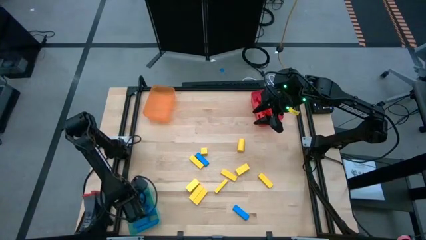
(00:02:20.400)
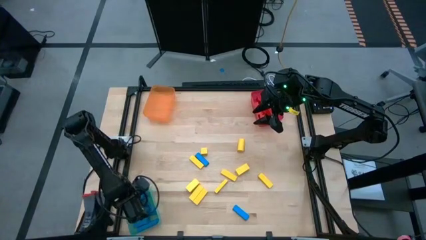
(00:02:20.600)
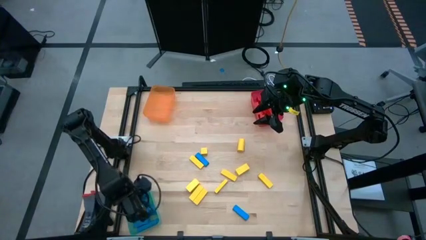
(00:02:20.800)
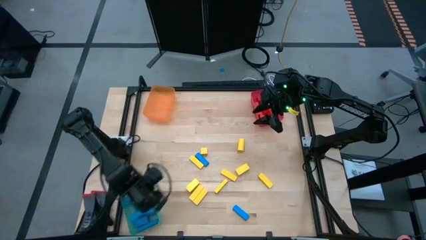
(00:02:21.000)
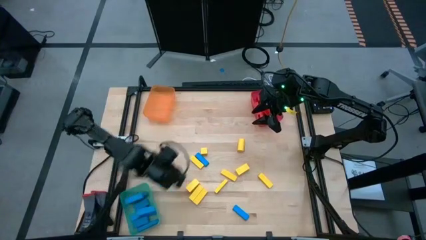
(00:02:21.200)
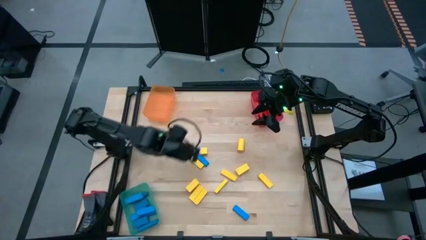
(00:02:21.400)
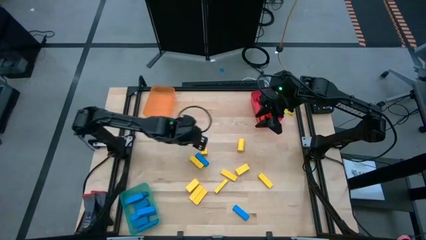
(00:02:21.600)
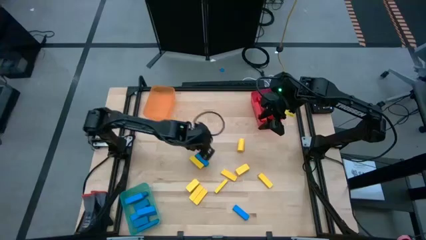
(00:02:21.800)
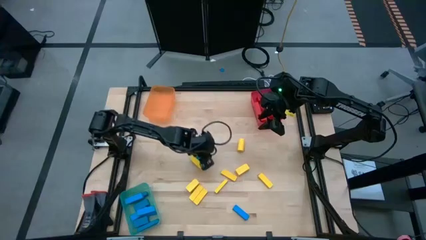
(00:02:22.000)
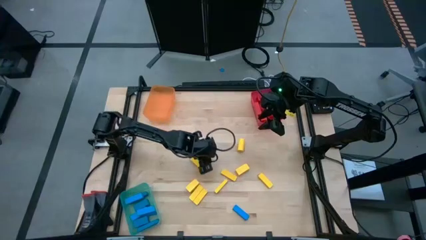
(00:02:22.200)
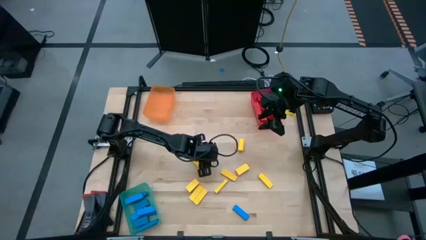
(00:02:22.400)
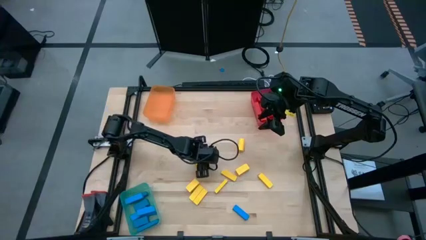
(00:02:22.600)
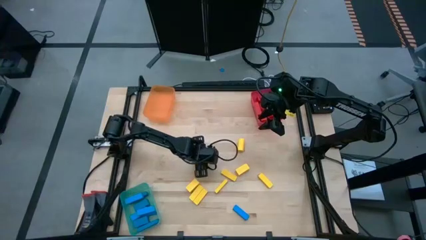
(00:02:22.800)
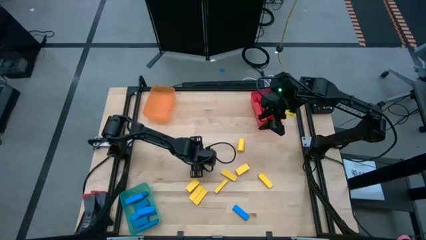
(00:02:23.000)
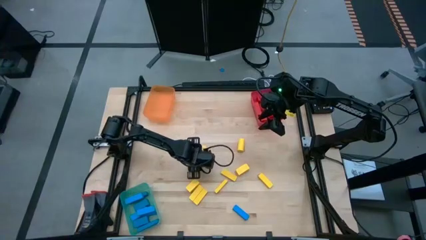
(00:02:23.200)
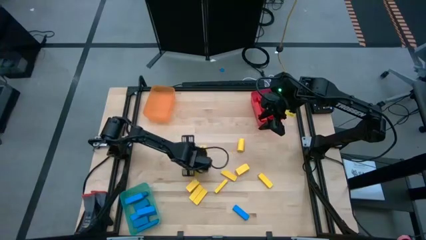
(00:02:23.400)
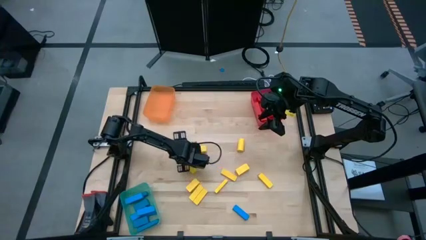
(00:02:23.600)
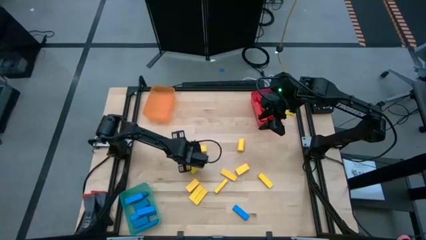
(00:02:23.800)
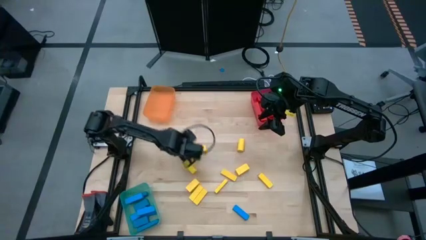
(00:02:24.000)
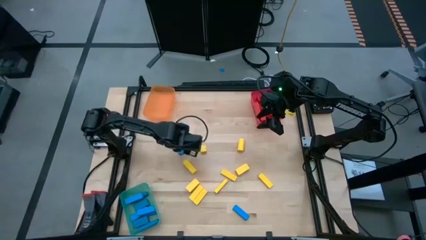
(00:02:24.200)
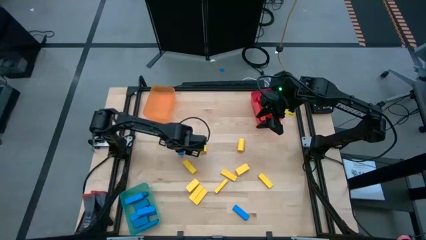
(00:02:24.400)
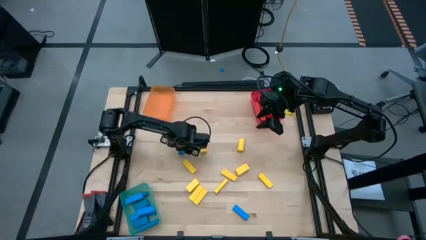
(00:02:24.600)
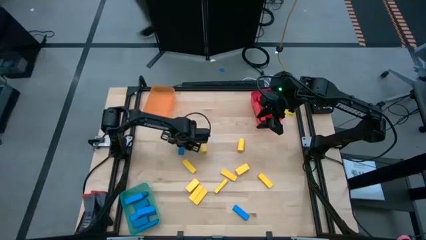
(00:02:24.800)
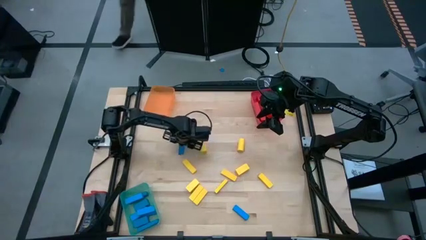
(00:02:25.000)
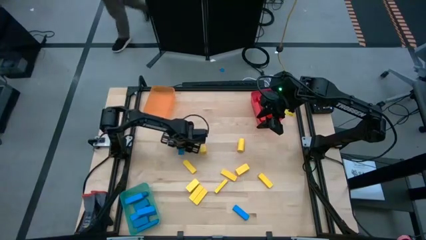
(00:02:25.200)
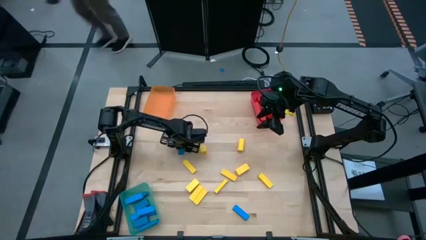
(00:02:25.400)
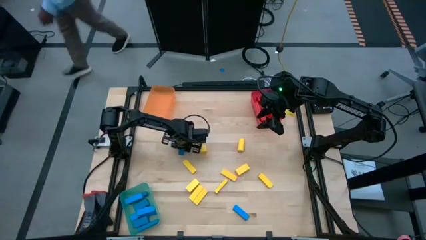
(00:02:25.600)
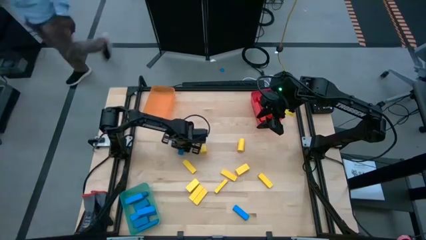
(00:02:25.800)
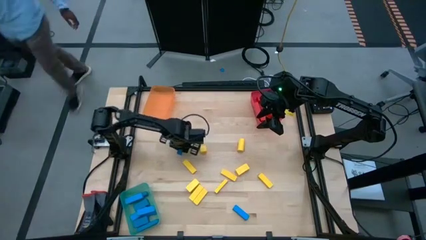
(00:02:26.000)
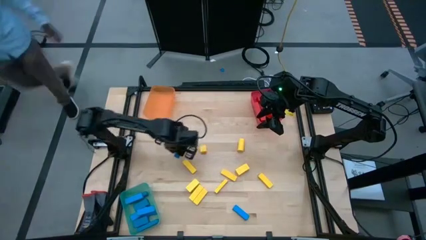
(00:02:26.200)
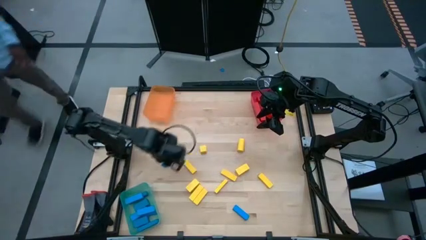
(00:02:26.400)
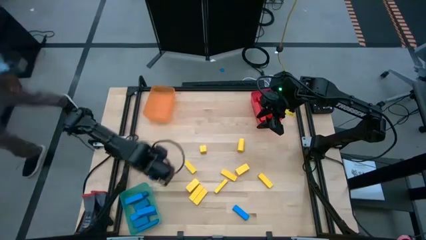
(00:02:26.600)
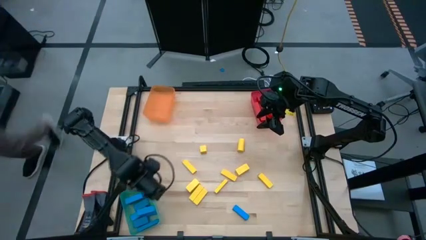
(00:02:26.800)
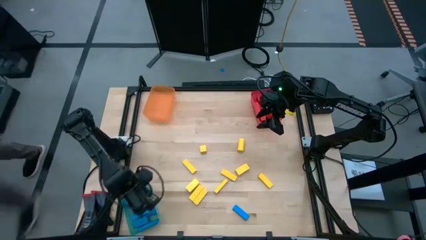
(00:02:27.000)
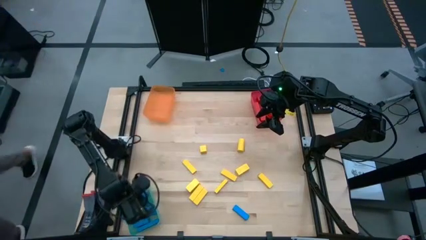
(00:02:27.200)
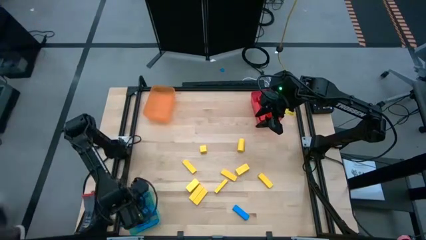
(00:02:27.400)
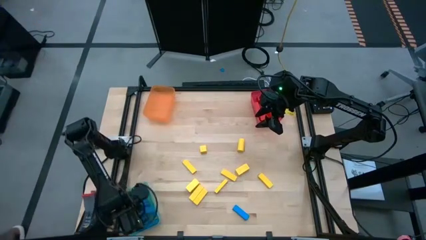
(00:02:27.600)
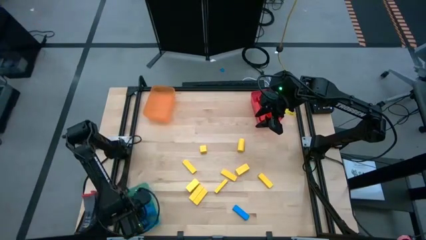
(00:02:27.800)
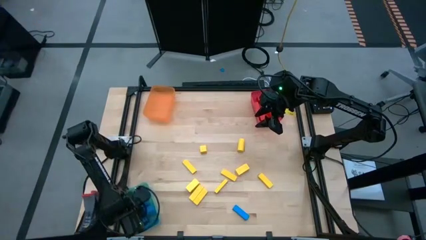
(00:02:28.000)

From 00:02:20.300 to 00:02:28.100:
Task: Sort blocks
Put the blue block into the green transparent bin

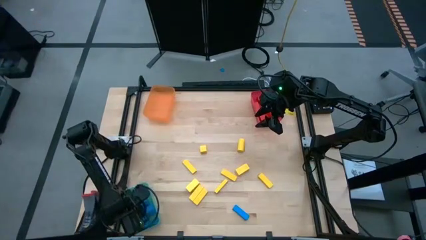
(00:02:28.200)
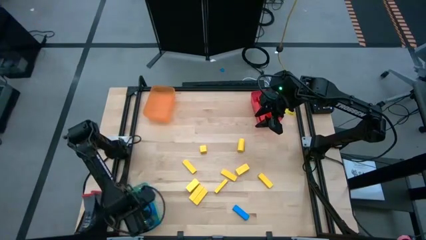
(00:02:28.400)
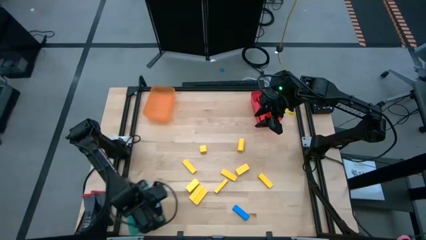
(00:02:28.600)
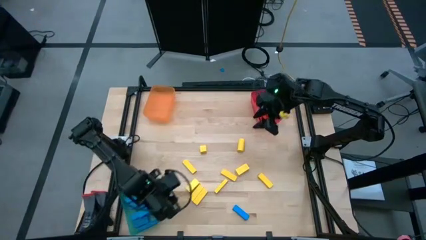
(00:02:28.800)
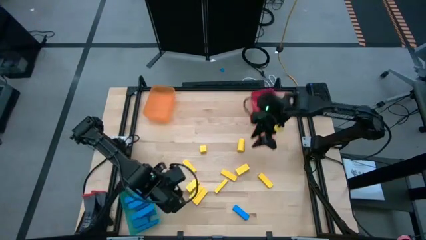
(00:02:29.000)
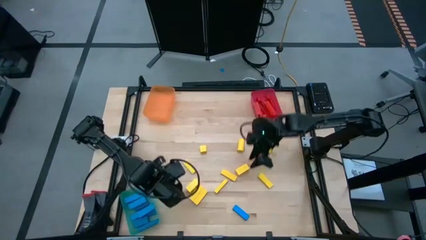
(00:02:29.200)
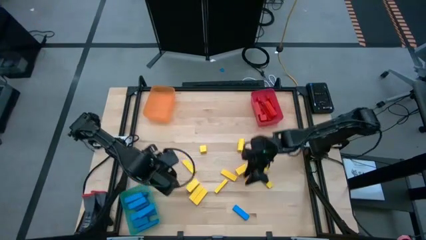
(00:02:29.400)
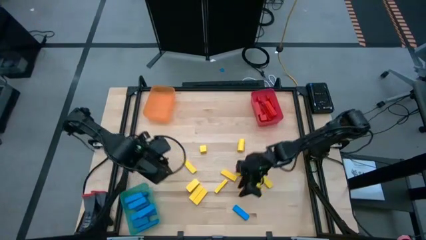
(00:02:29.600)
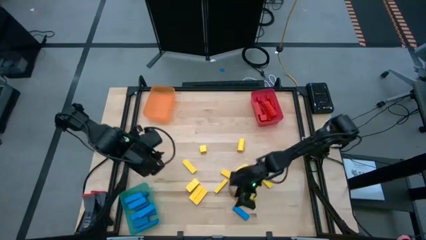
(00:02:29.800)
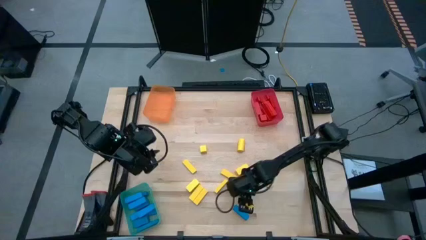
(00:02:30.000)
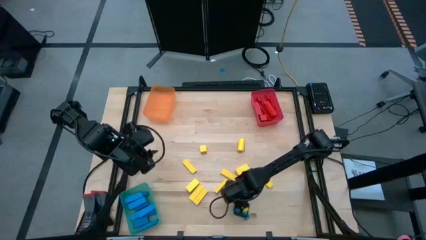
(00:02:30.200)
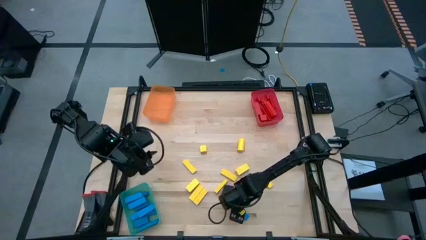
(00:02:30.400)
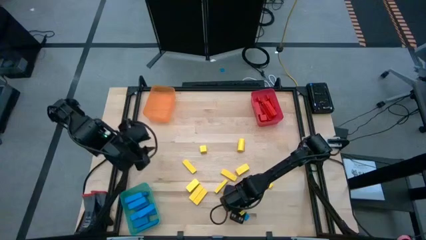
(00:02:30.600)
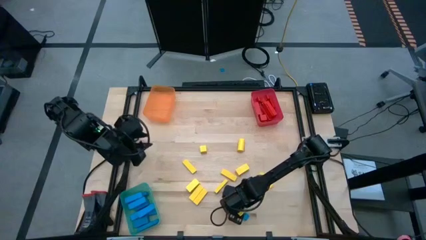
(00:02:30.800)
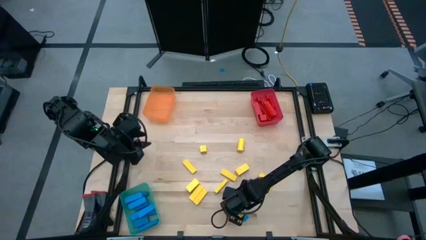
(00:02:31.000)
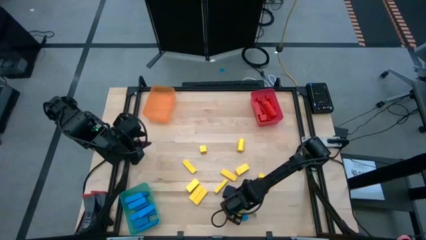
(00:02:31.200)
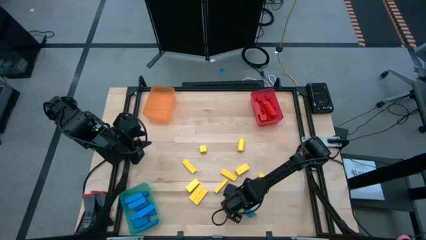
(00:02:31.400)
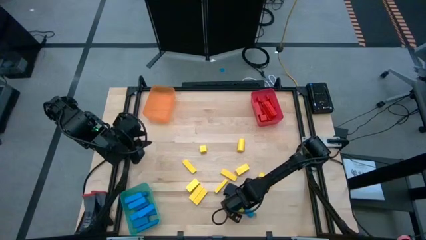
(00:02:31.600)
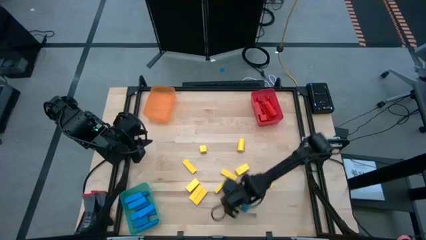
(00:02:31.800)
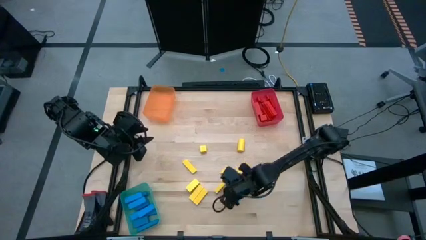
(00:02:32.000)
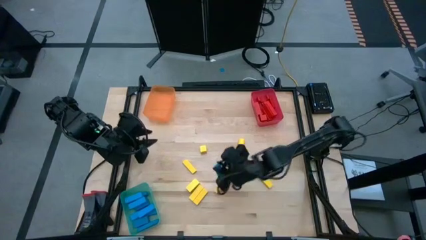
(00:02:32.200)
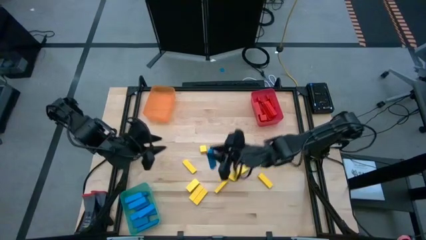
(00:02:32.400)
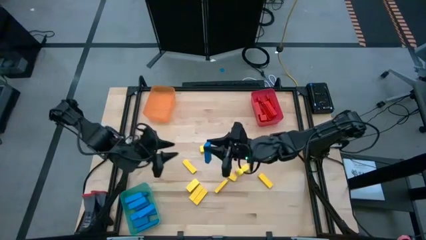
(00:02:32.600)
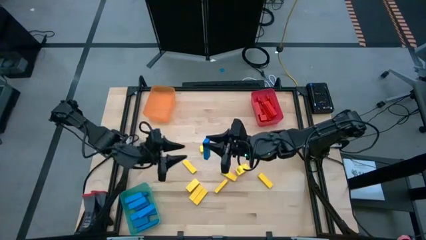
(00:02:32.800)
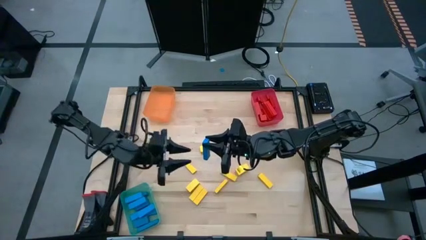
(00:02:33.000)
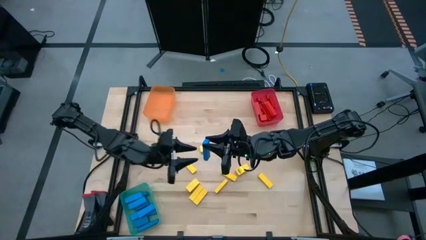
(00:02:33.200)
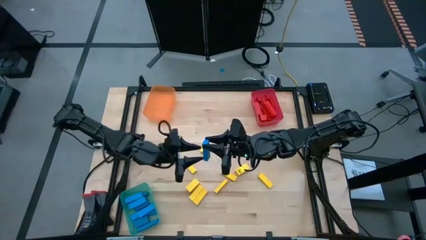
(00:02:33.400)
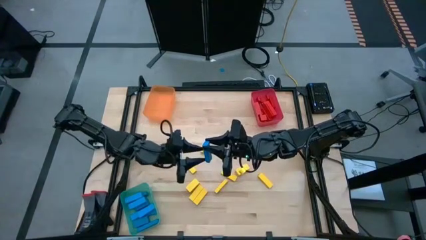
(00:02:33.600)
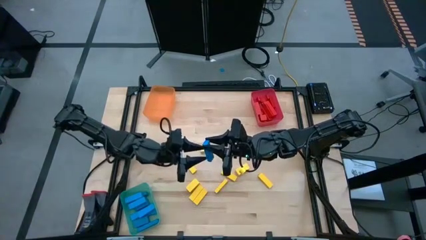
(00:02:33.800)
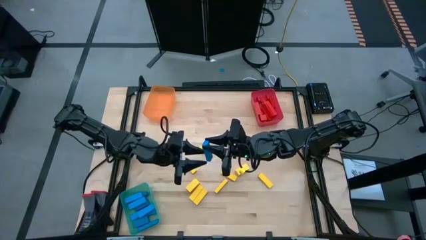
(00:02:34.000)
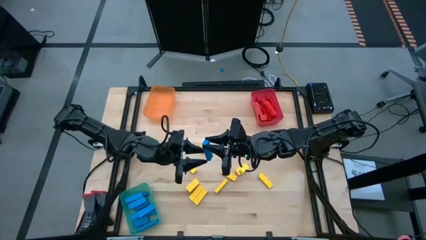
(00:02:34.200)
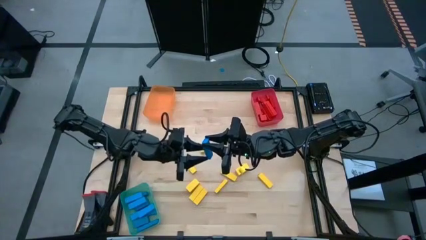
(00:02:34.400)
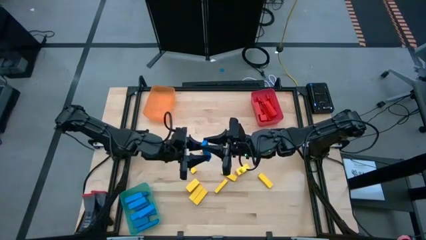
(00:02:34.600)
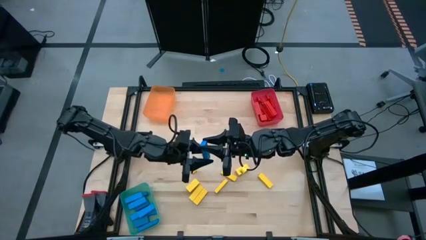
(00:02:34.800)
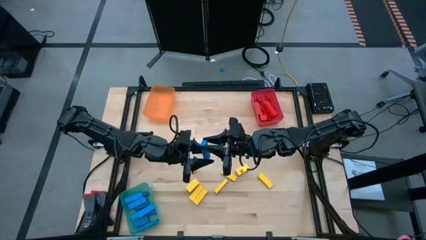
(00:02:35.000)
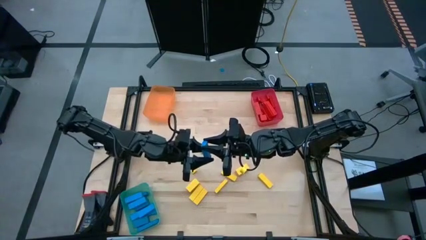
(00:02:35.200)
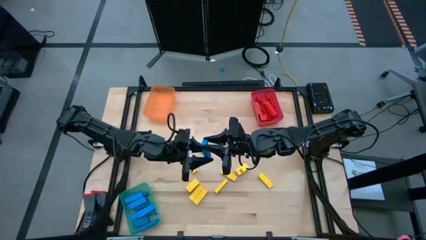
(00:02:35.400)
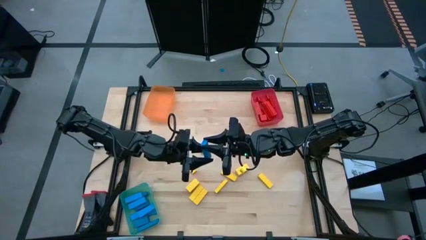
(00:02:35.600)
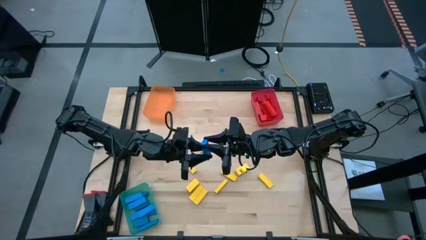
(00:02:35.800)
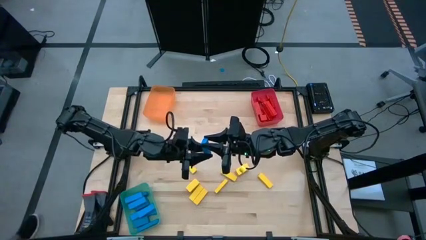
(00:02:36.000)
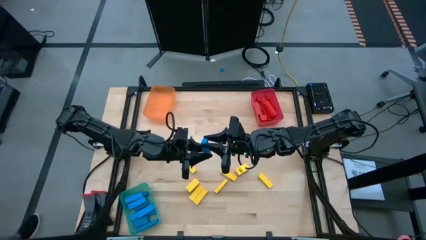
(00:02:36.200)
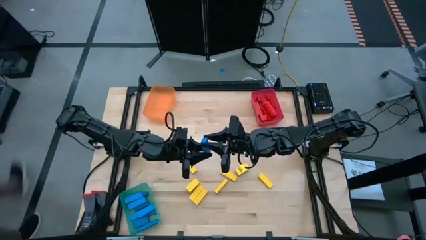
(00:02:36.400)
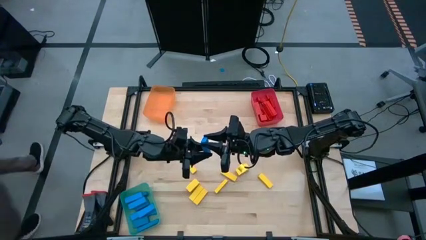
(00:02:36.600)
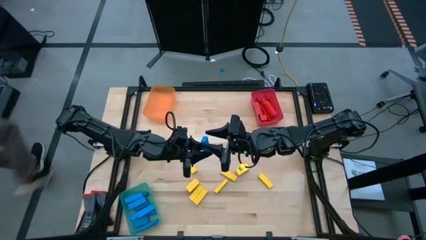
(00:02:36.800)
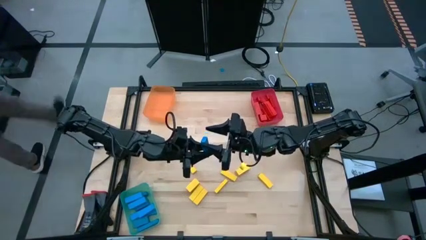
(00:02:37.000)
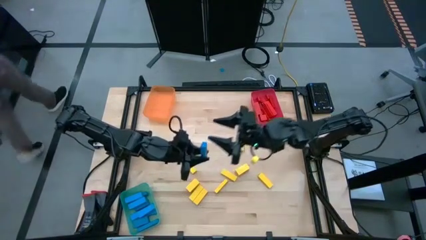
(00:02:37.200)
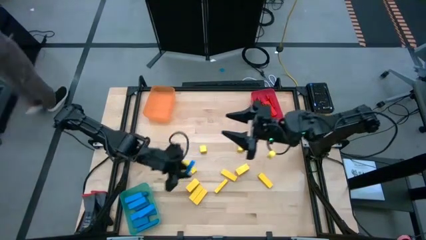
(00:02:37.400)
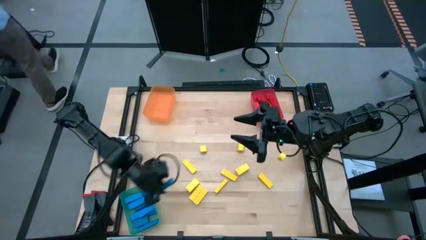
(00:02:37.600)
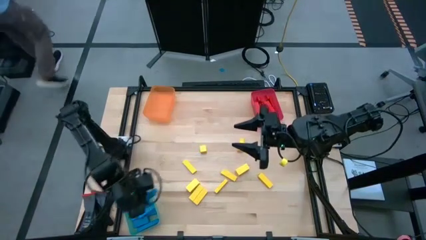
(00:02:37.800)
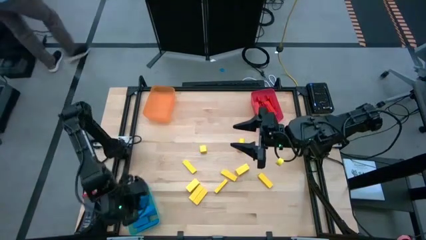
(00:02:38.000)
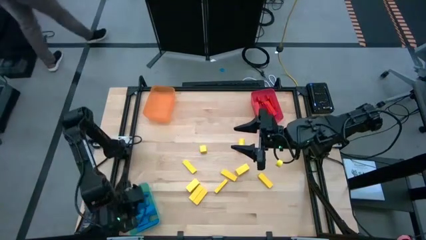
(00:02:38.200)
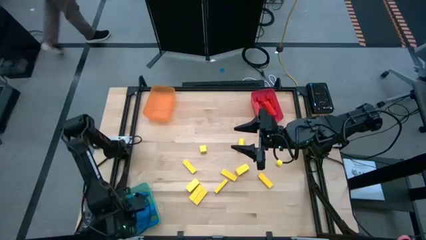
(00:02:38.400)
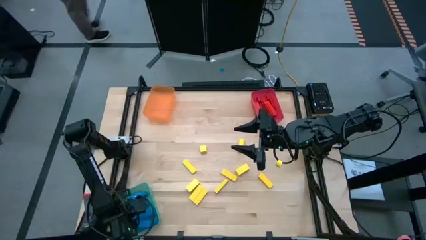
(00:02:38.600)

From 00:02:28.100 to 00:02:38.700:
Put the blue block into the green transparent bin
